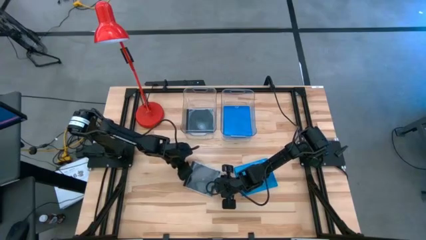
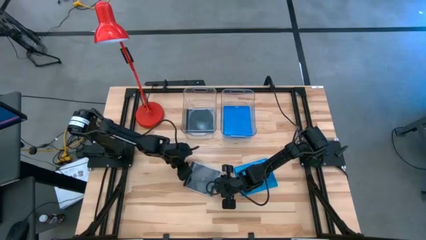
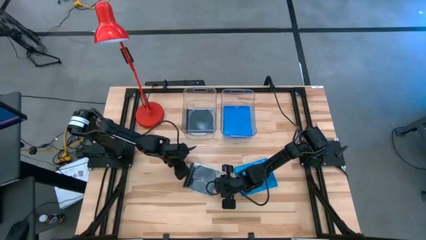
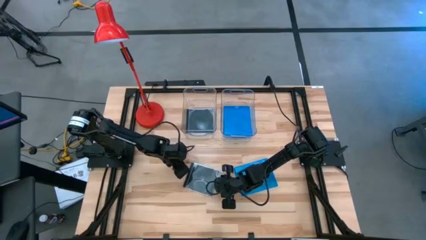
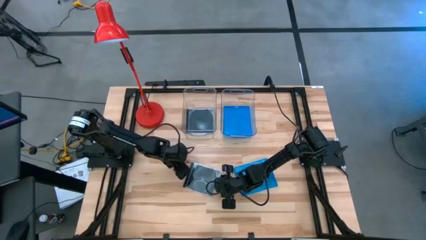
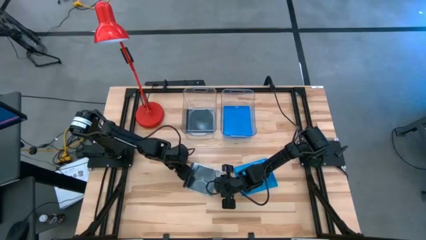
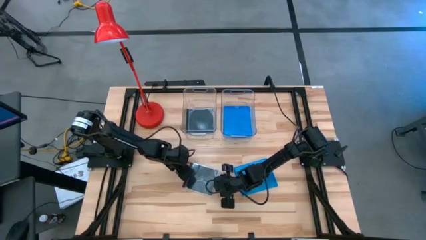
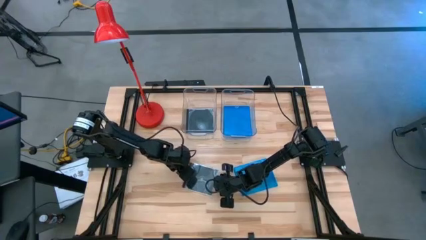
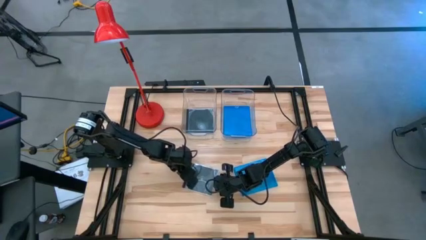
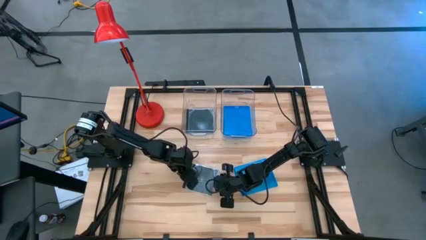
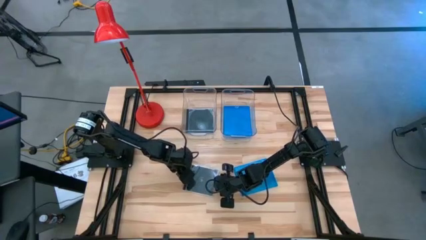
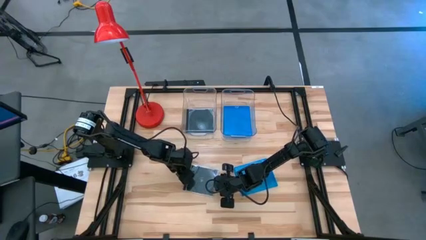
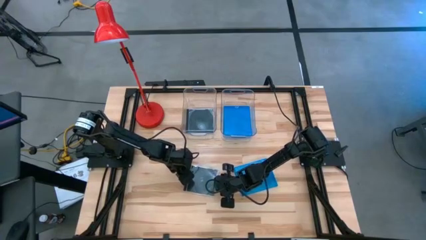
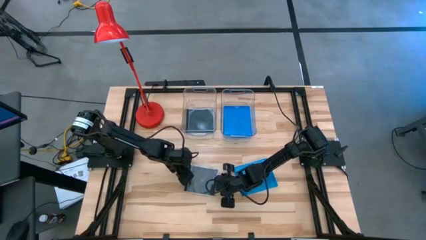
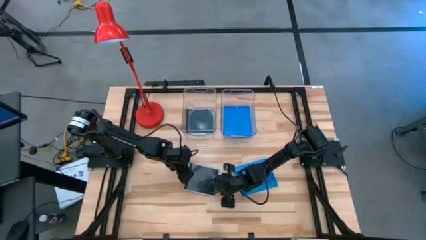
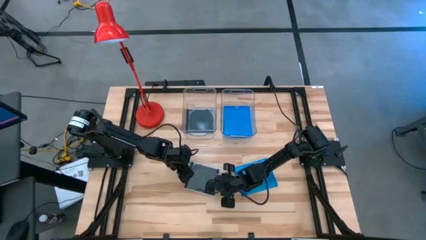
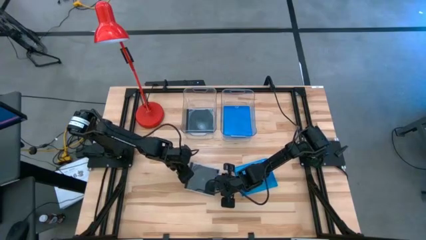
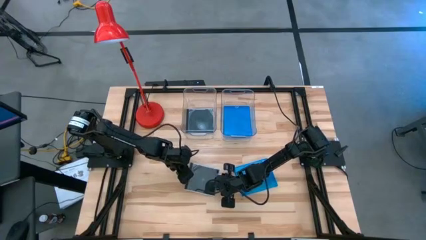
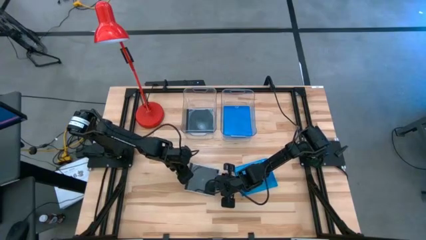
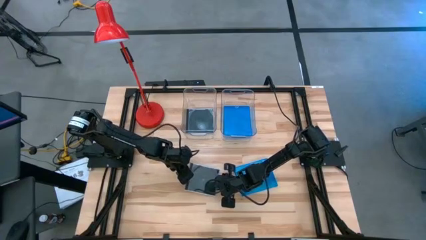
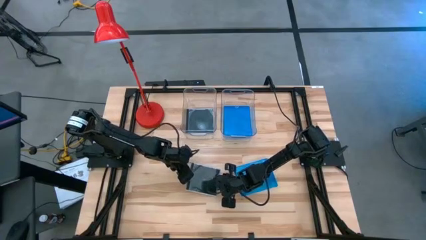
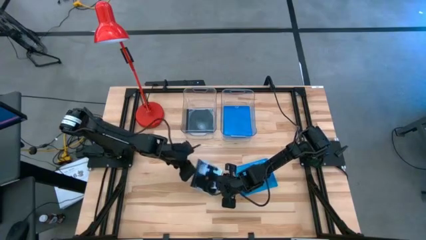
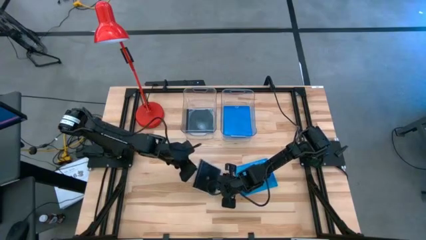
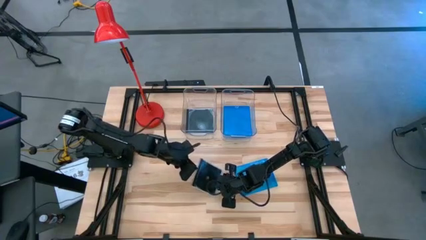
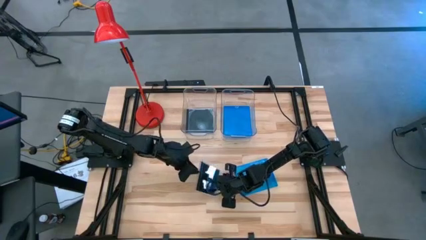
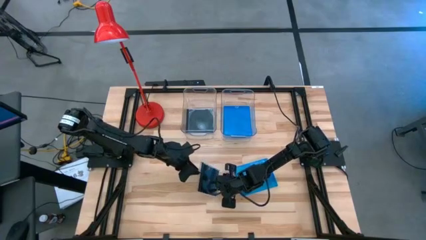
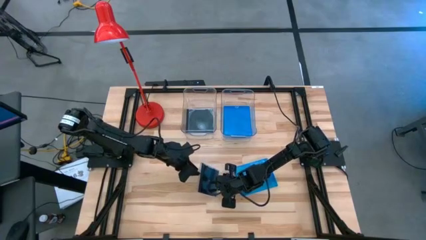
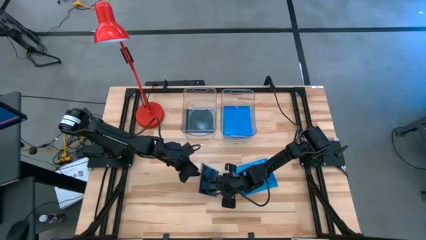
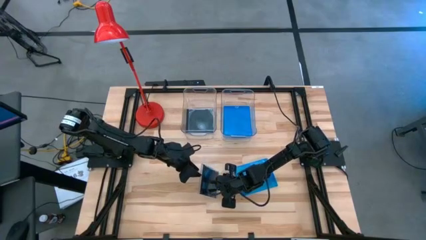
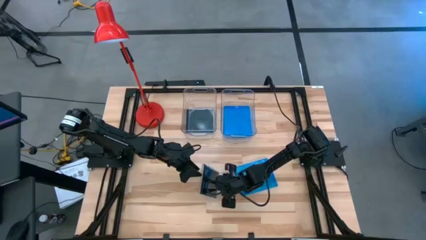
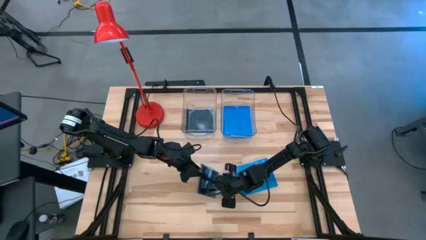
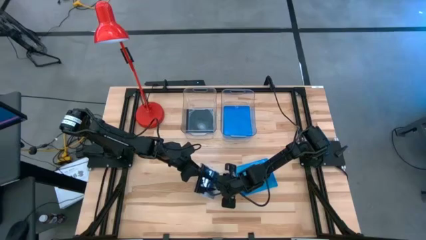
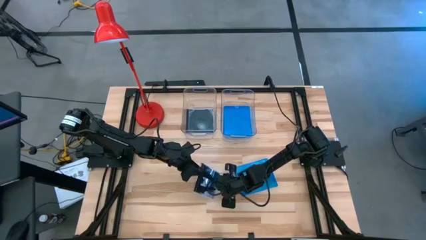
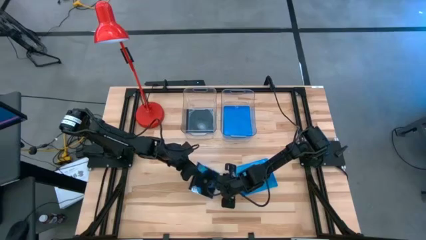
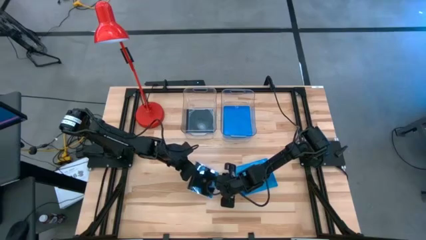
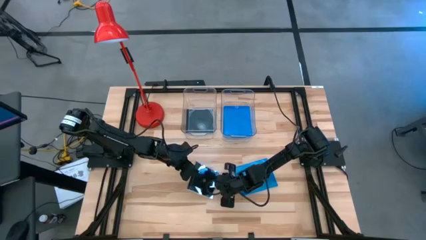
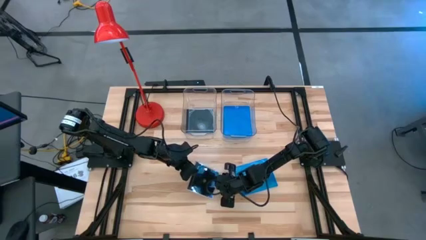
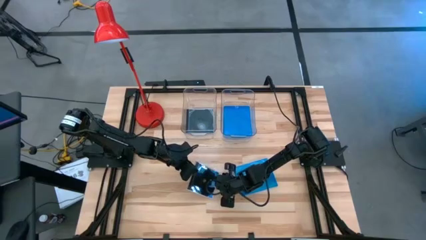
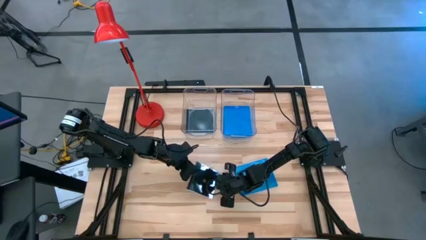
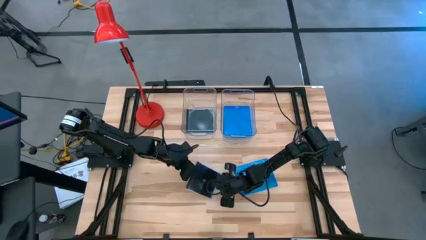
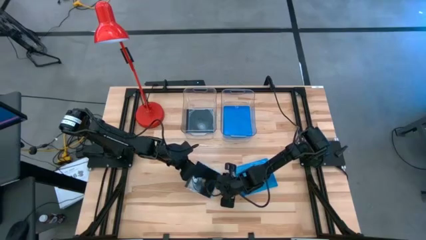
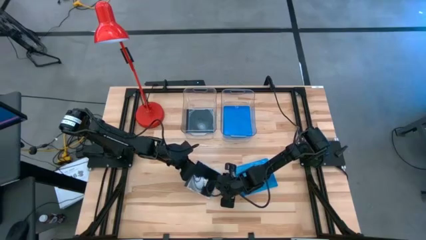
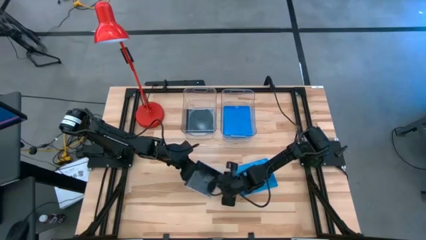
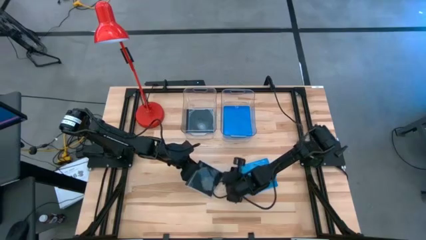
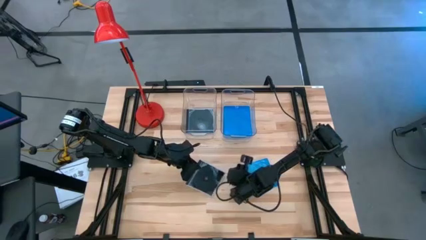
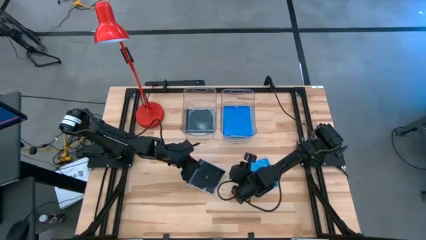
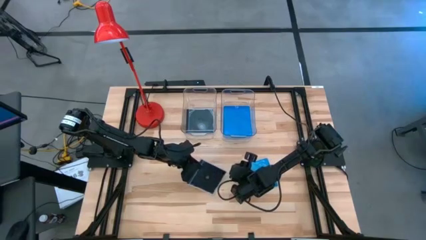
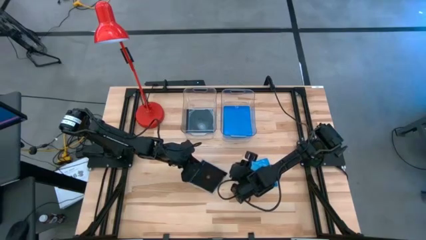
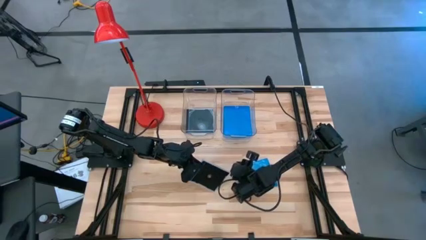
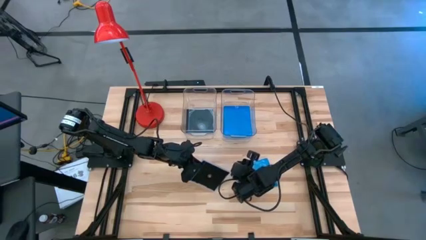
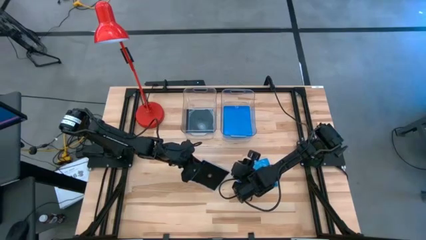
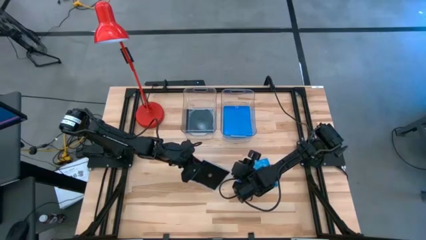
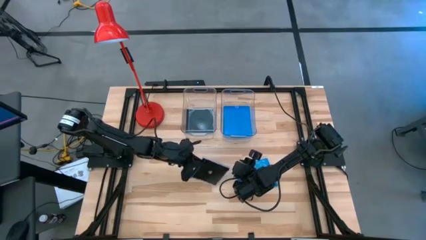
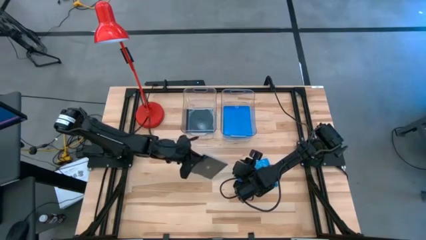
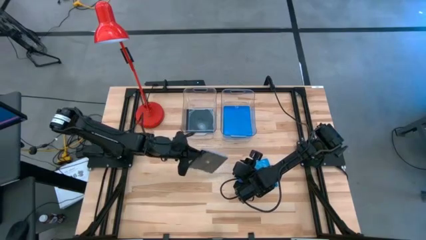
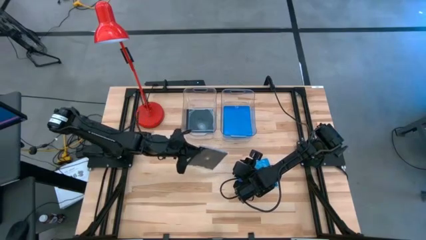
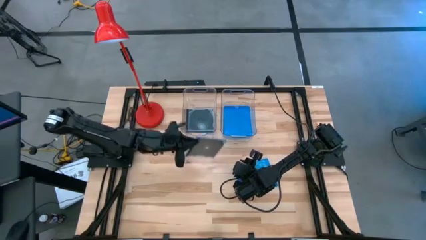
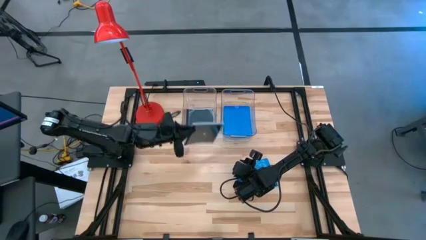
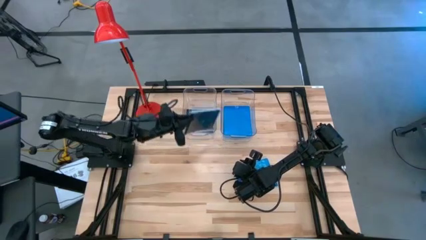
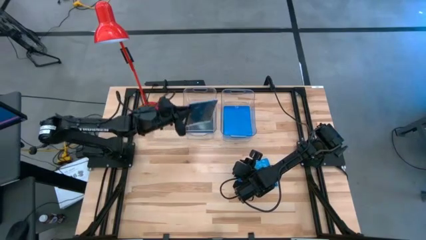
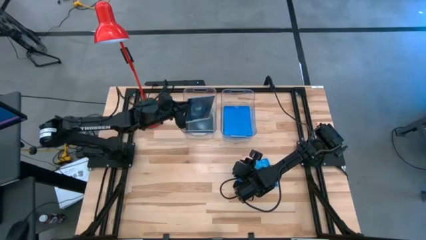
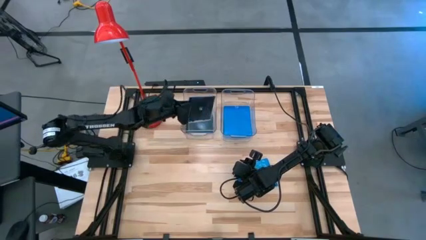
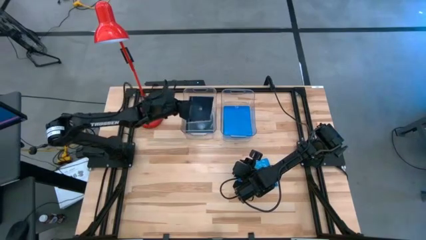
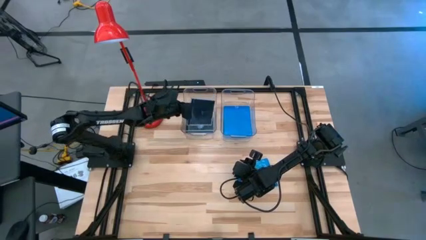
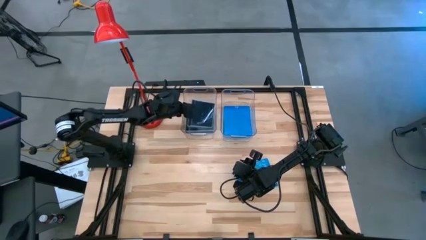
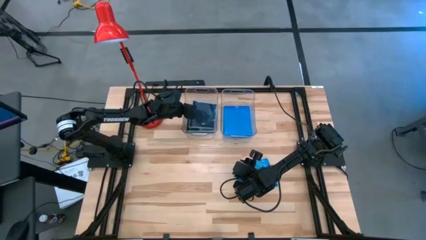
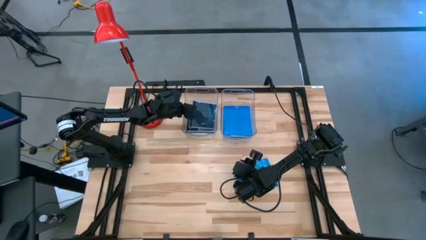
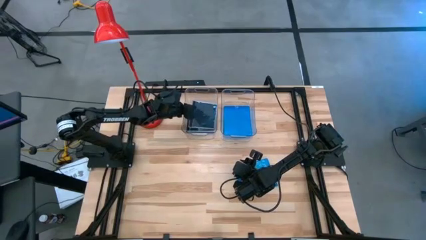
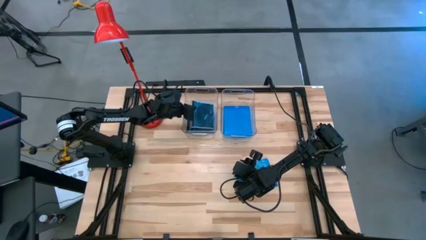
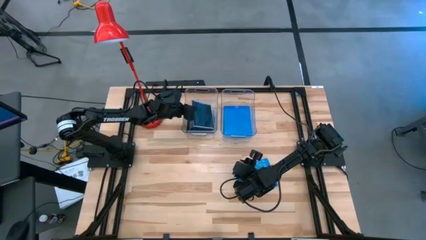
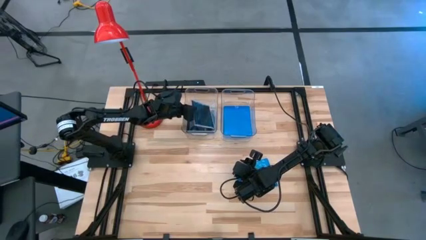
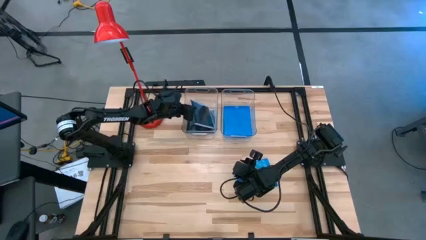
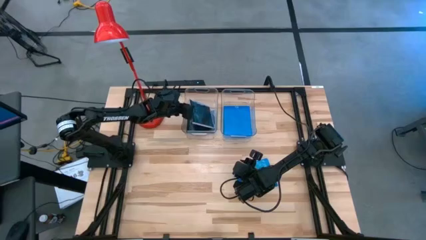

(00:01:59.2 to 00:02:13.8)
Task: Pick & place jewel cases by type
Put the black cd case into the left transparent bin

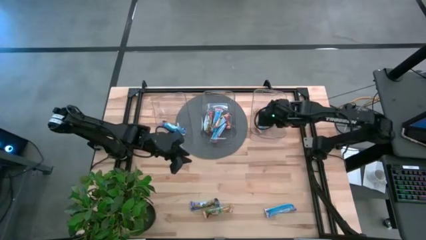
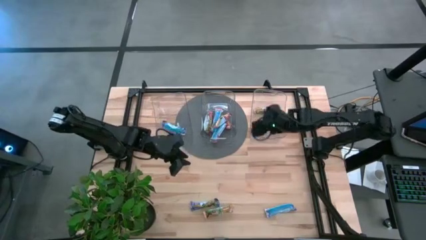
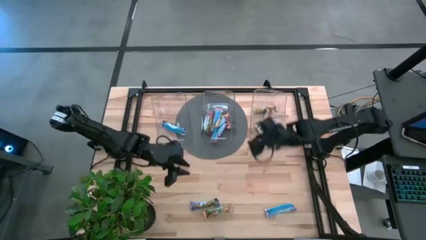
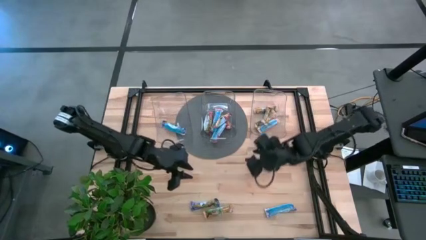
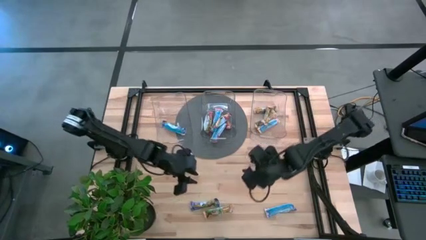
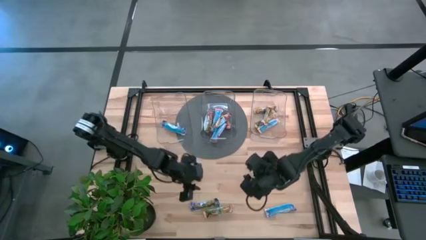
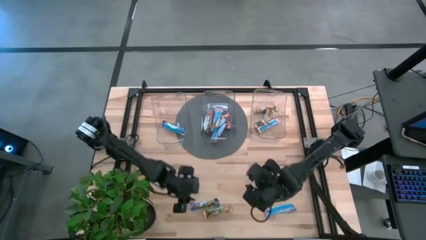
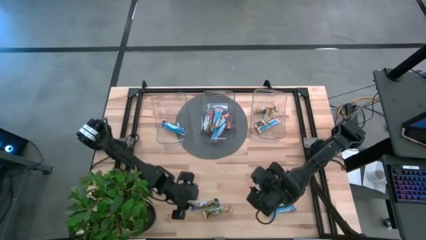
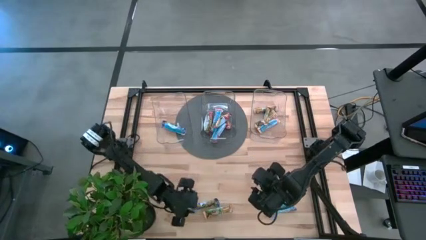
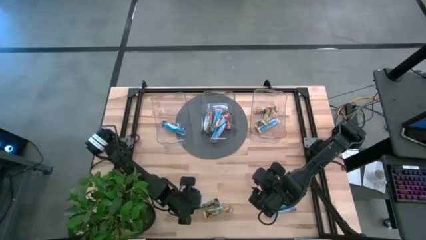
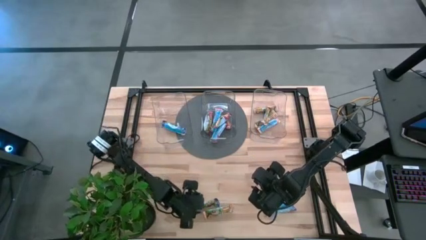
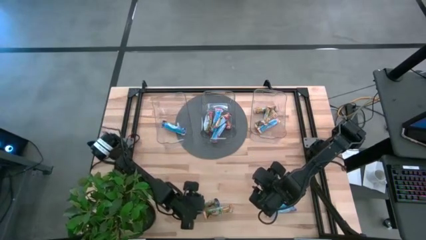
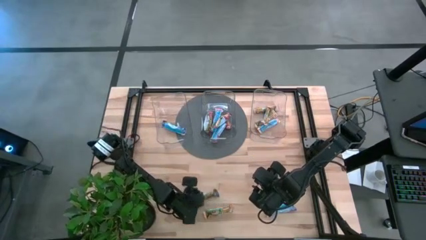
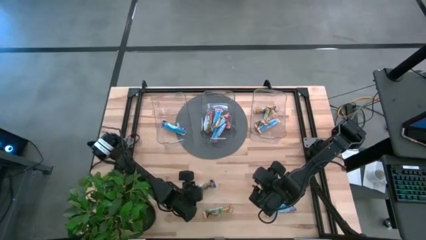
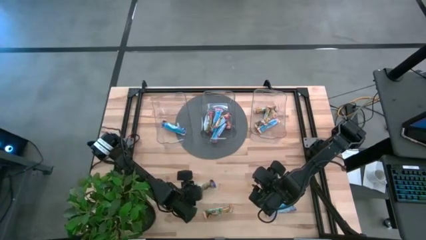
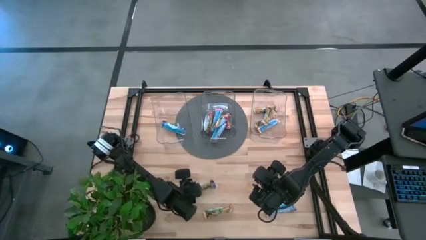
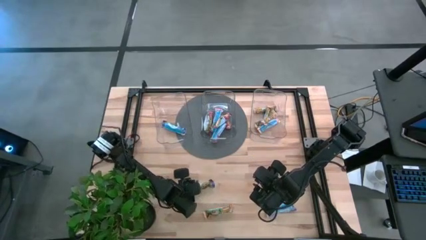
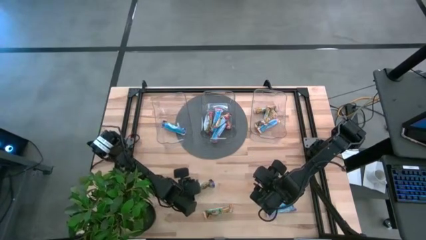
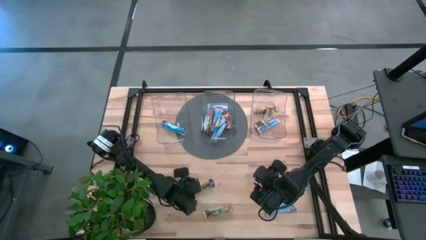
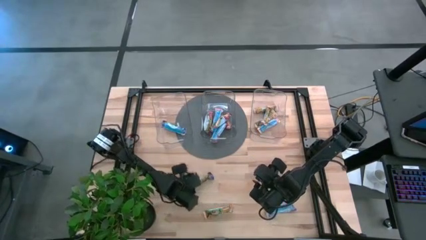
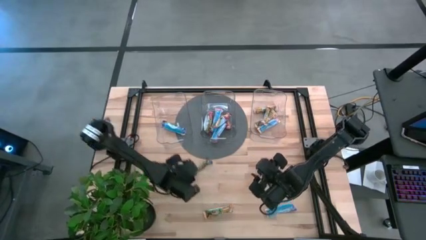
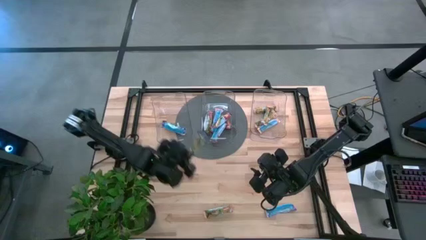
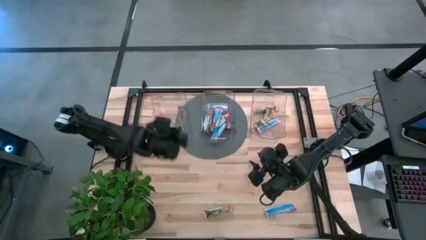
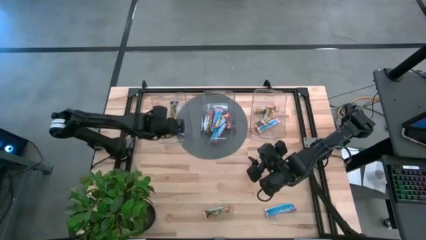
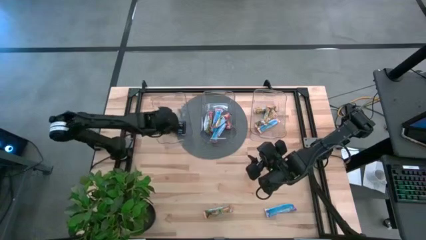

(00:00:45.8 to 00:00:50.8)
Task: Pick and place Granola Bars by type
Put the blue granola bar into the left transparent bin
